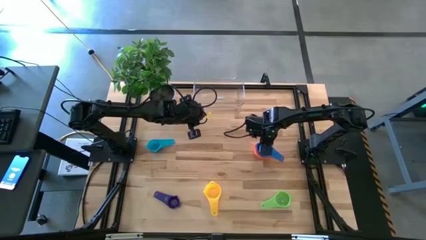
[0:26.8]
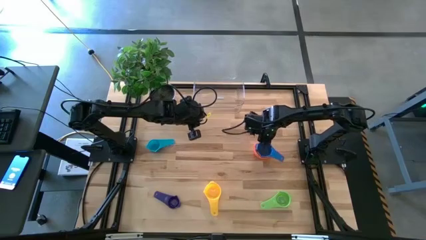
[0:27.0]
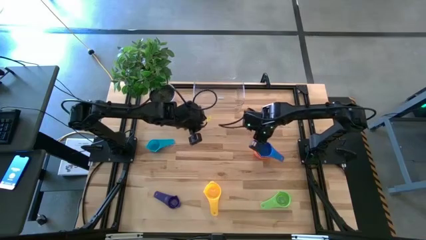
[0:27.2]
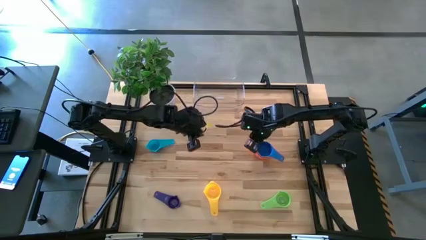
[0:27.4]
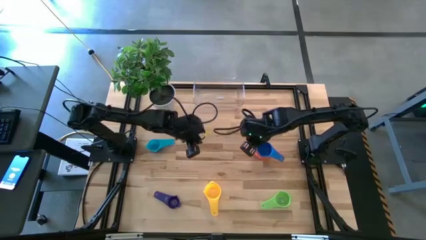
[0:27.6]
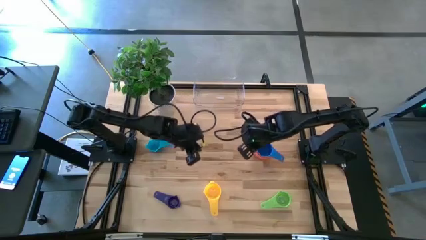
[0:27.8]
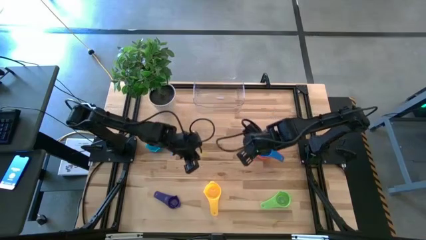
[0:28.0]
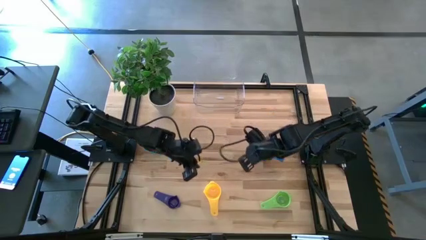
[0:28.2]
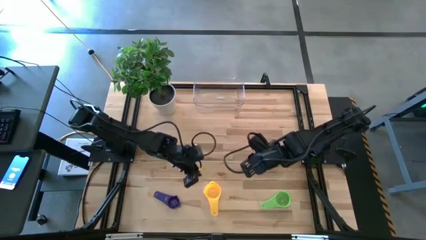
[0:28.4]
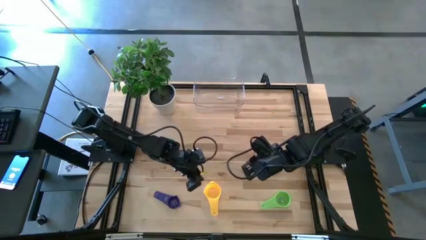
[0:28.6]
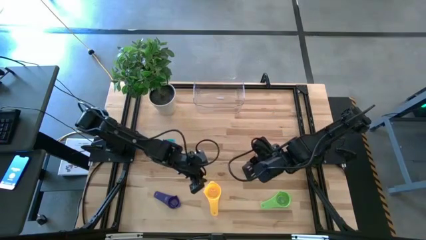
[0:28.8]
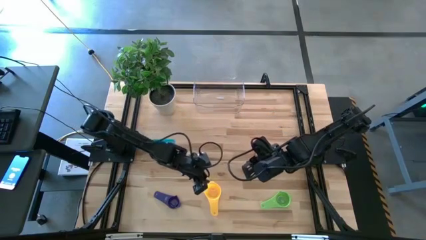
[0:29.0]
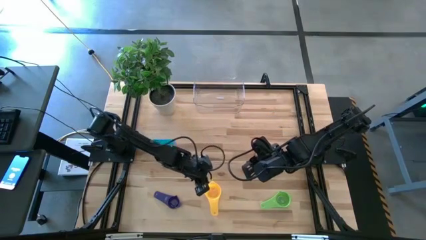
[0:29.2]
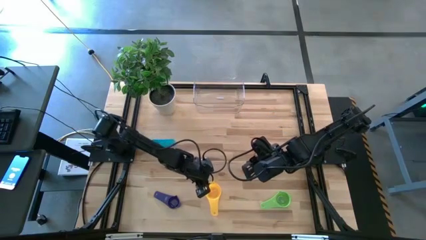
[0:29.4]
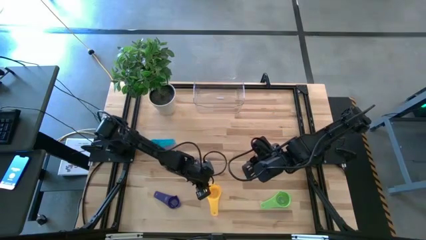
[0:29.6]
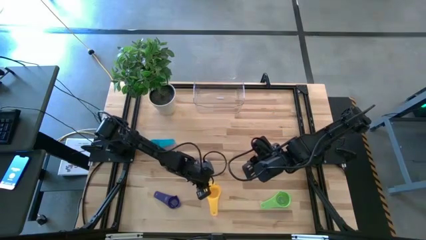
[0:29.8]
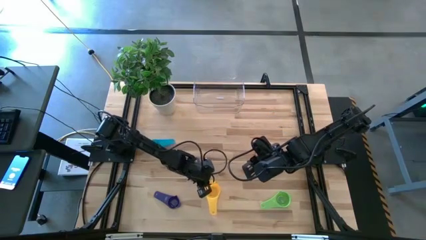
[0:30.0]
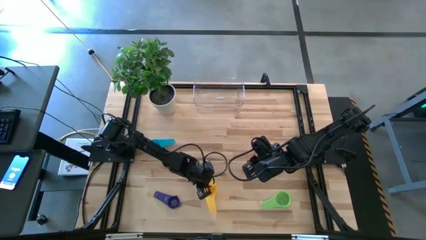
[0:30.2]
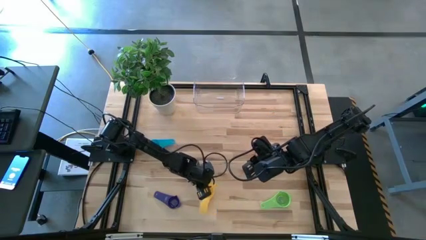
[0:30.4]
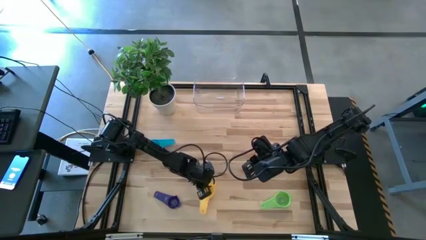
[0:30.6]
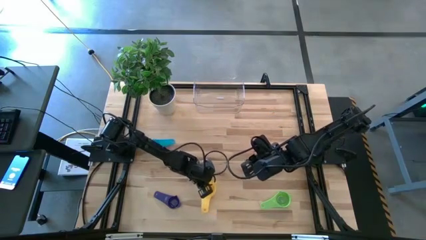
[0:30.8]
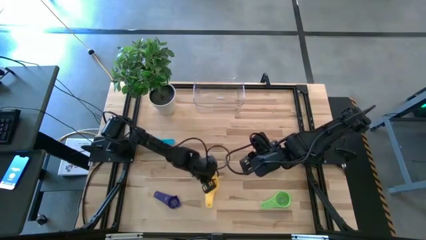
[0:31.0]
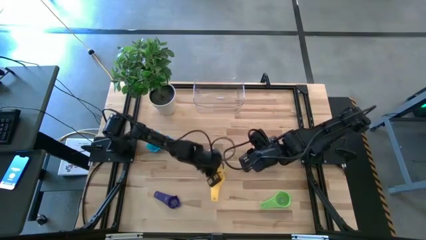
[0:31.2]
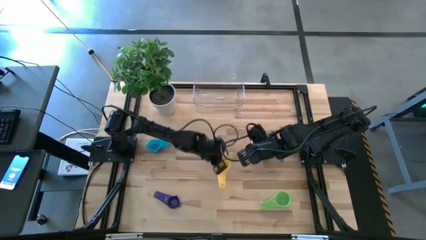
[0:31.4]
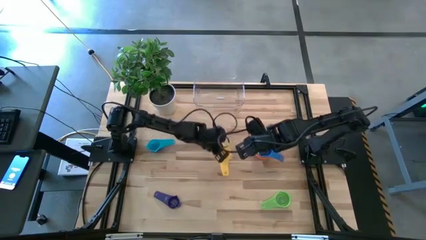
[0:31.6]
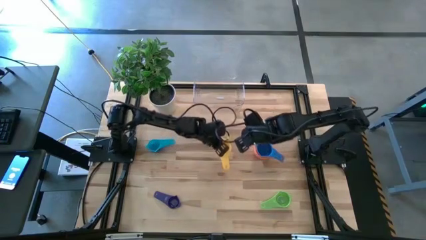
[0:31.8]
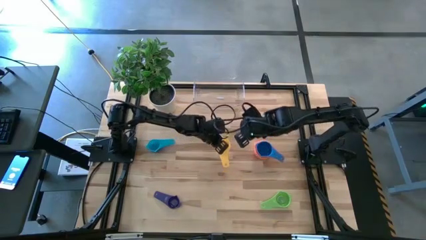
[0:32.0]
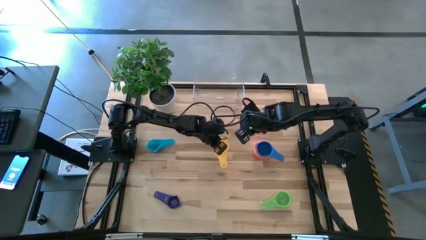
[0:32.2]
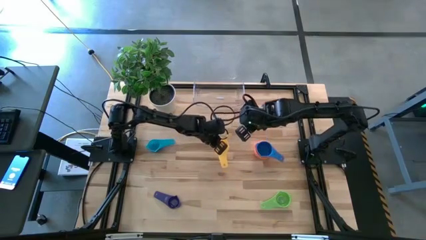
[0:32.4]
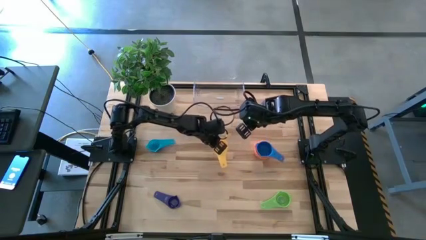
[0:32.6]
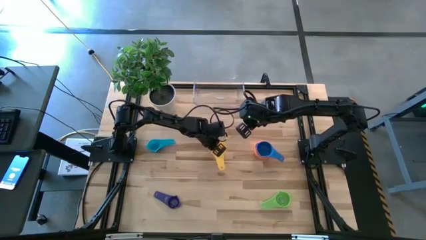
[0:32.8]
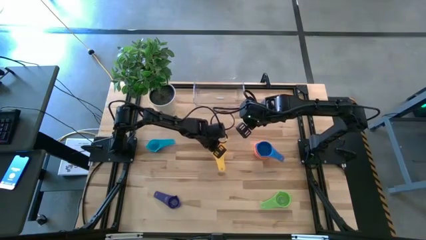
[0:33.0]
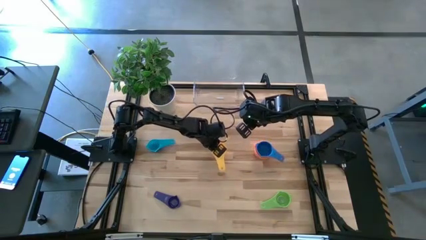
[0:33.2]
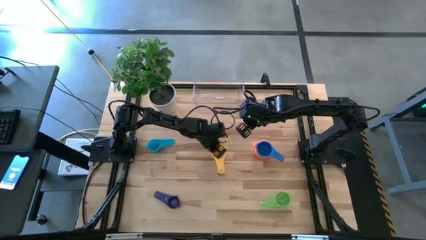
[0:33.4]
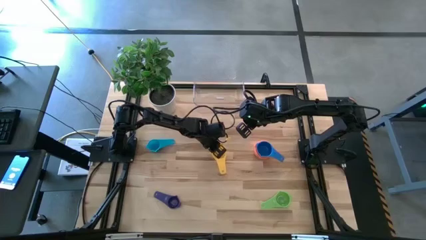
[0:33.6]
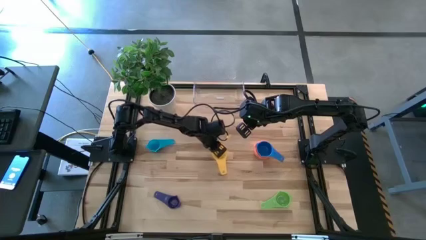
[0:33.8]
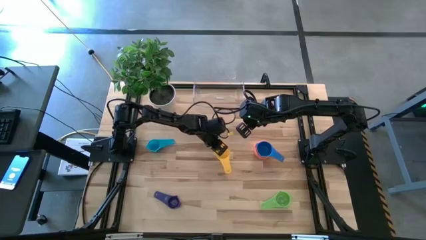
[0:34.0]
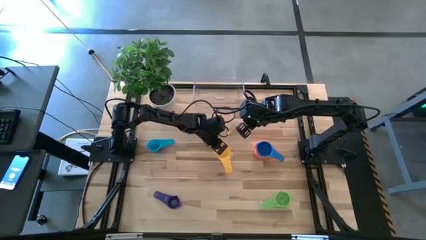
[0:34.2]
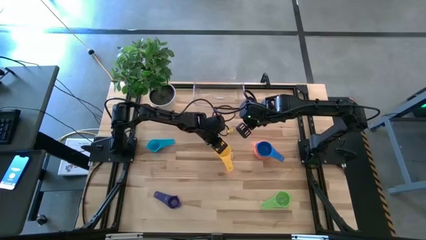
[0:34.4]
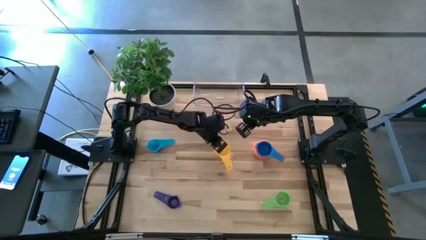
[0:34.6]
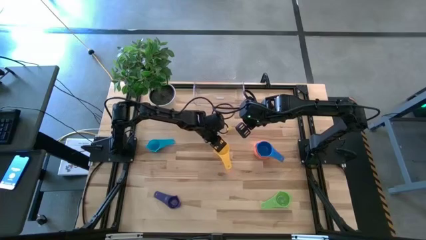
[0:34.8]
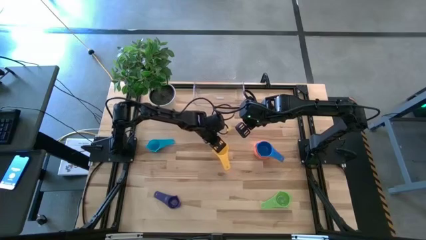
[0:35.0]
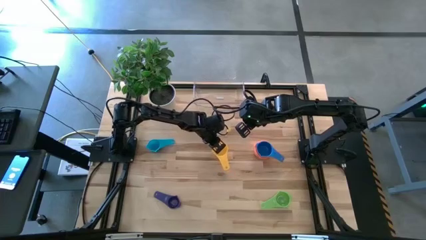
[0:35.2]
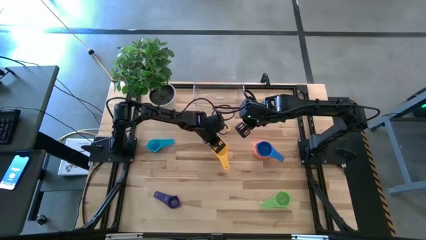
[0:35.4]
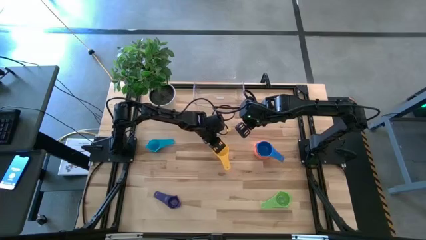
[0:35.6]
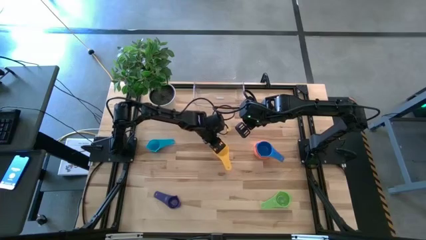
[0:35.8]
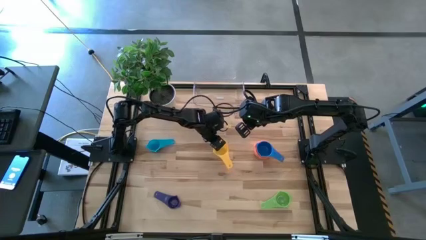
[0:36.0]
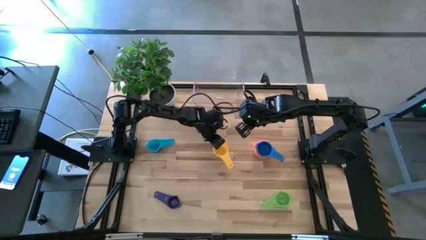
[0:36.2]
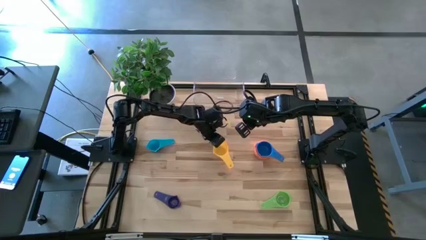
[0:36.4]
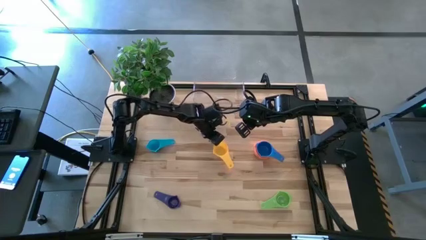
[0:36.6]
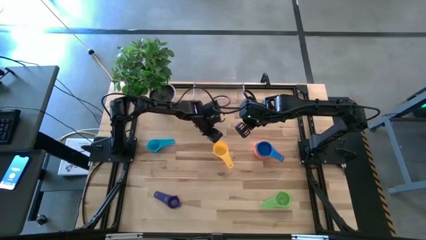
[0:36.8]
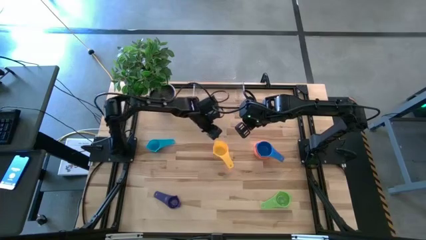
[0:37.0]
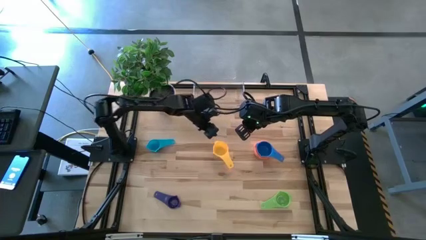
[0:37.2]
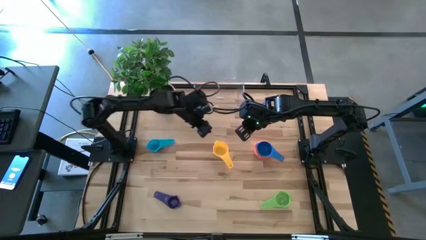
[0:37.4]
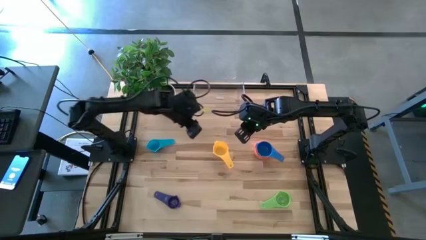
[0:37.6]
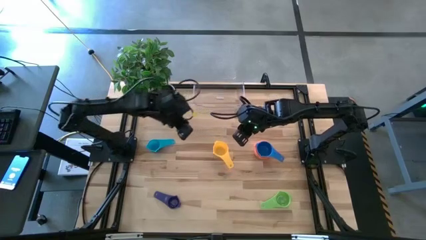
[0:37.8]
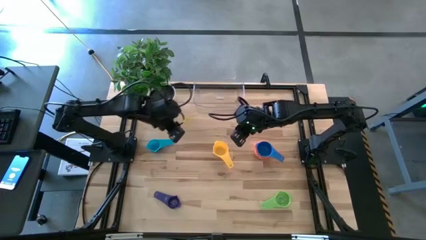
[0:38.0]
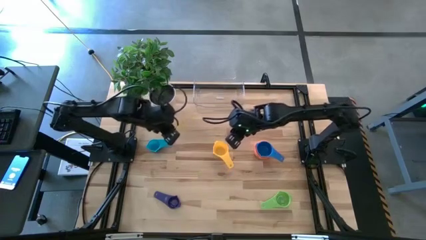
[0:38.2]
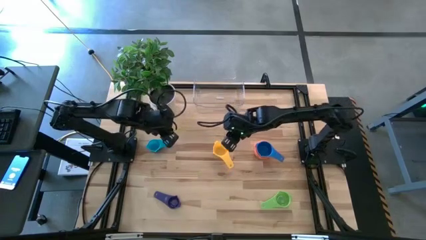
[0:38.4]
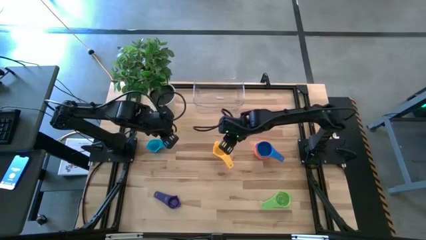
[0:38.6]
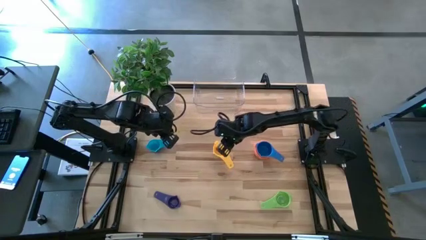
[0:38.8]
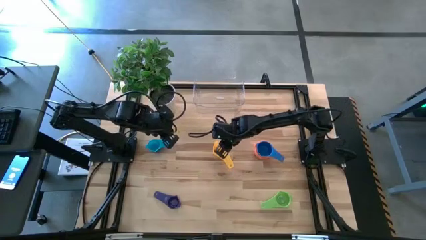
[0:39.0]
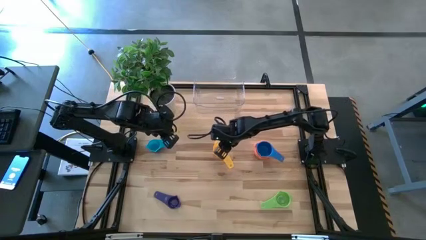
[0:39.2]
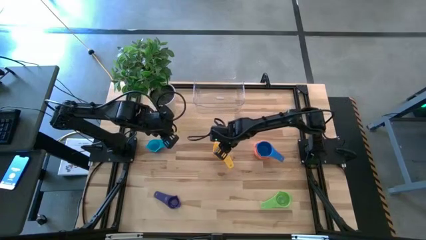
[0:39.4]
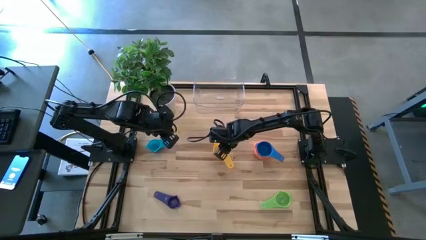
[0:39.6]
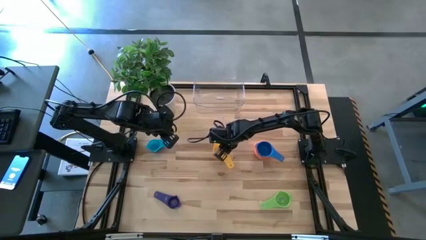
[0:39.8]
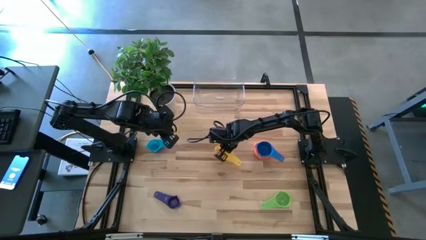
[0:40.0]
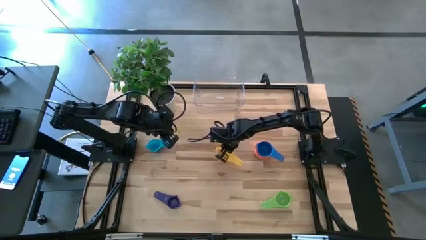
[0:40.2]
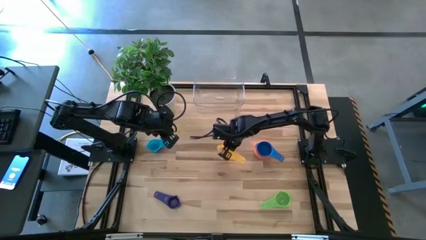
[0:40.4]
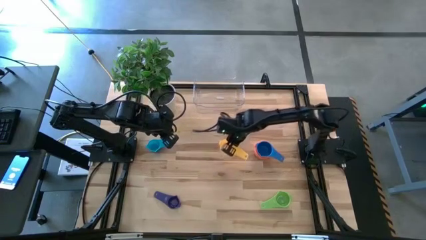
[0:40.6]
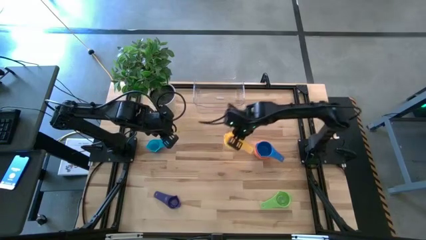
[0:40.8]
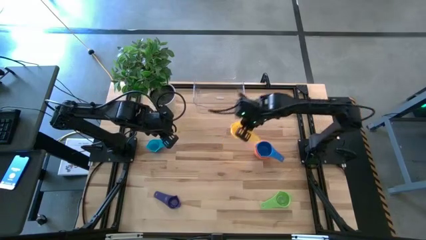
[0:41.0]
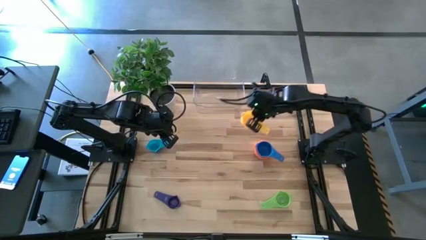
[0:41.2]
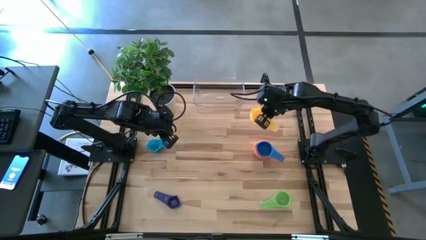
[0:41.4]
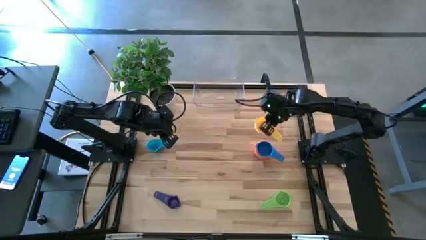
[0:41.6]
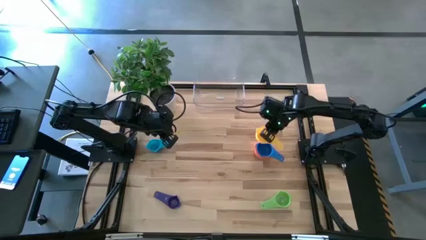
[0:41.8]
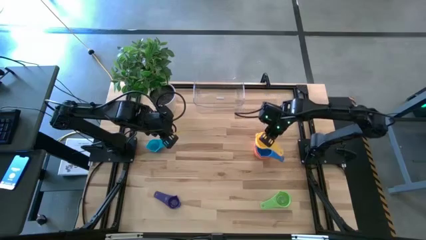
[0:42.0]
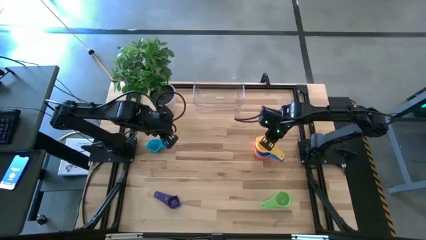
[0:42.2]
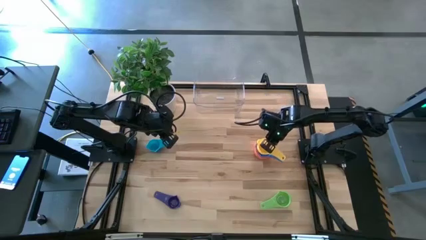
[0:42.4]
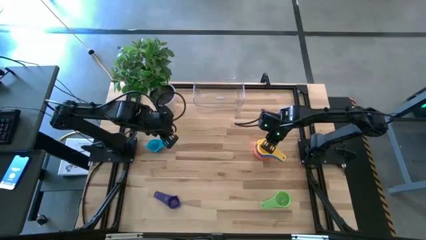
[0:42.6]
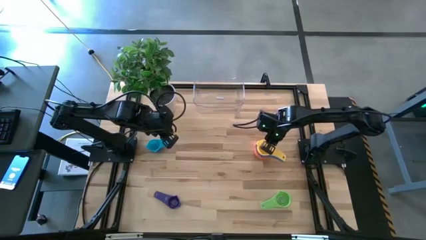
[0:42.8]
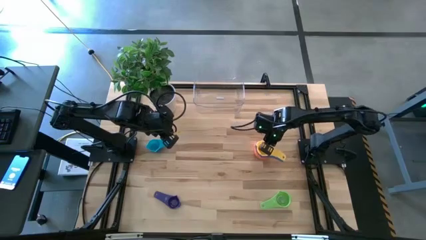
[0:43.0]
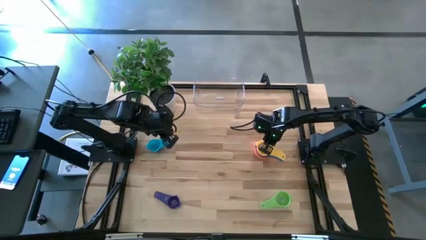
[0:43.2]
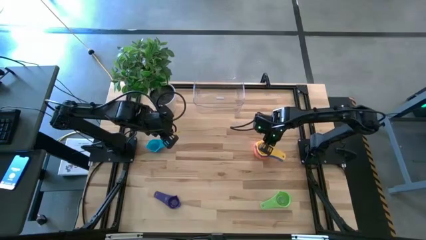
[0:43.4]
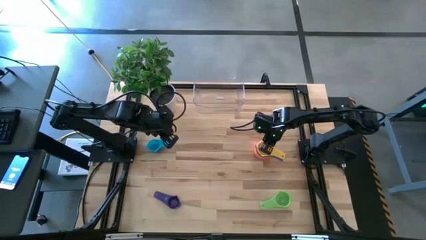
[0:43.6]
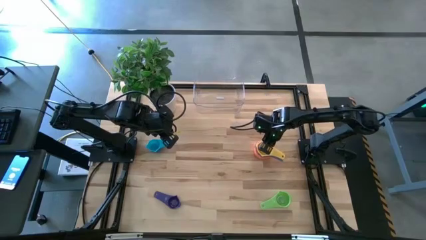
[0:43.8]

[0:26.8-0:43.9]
Task: Nest measuring cups in basket
Stack the yellow measuring cup on top of the blue measuring cup
